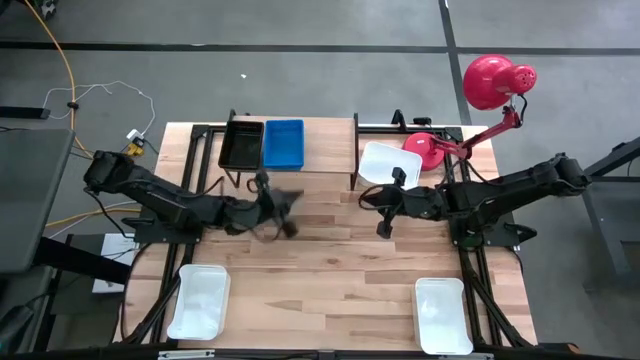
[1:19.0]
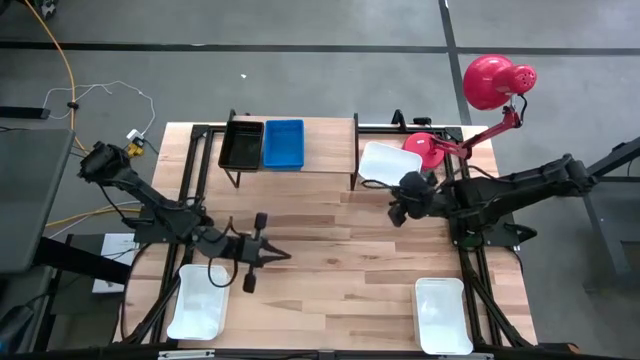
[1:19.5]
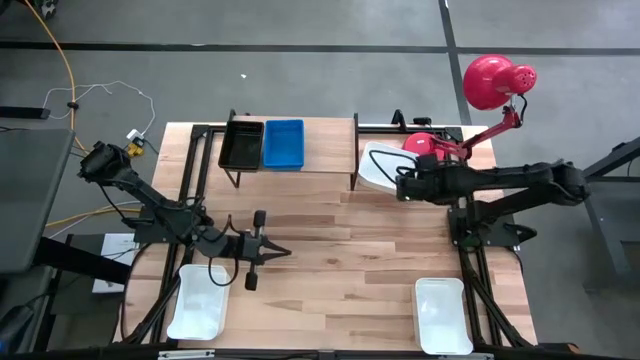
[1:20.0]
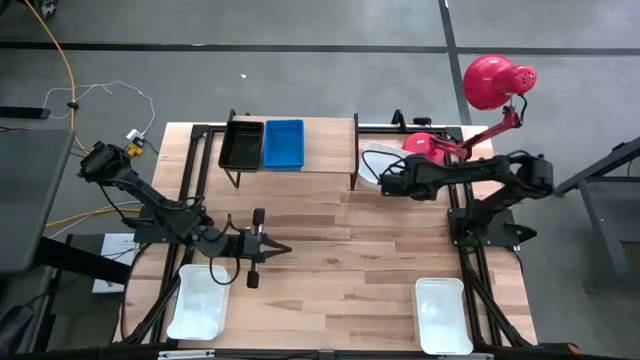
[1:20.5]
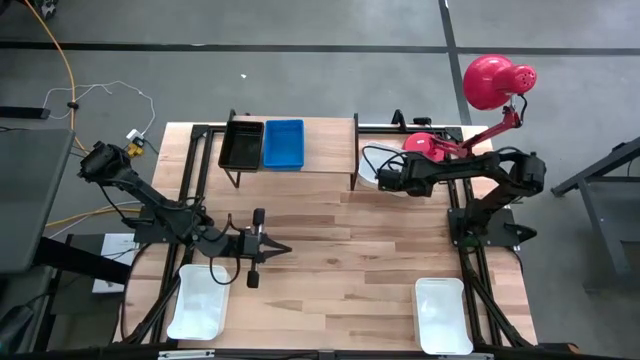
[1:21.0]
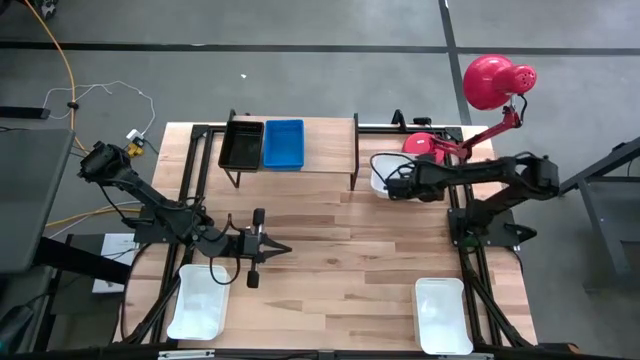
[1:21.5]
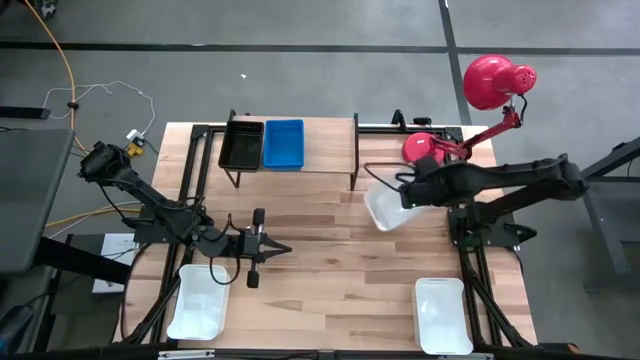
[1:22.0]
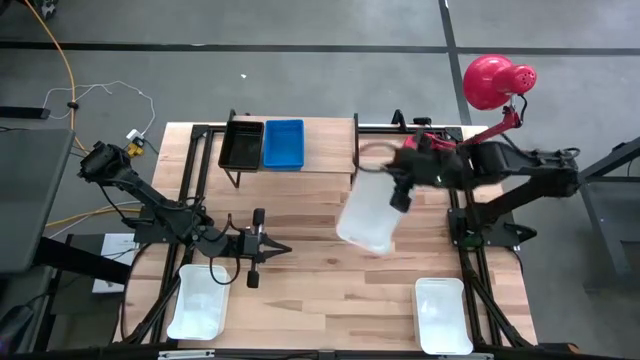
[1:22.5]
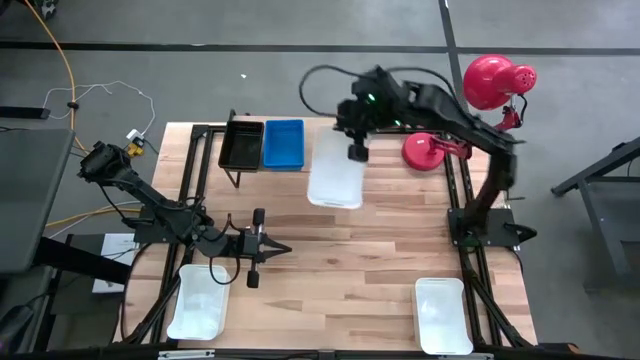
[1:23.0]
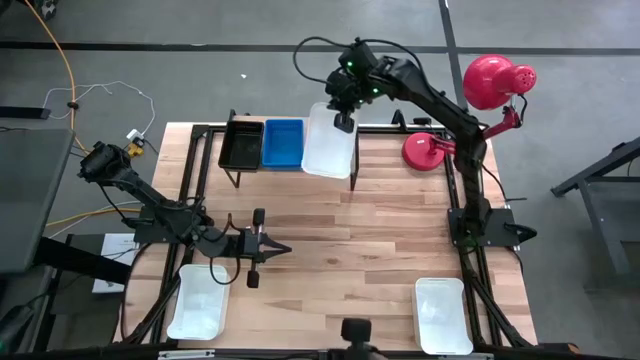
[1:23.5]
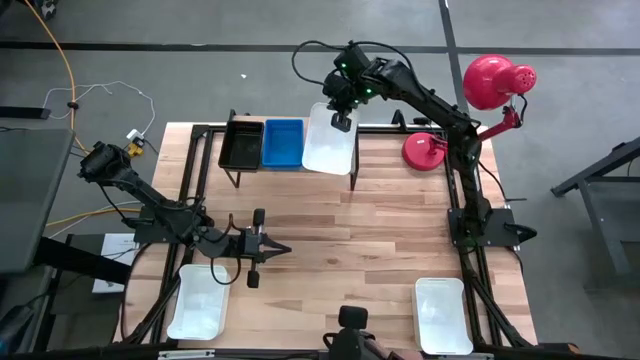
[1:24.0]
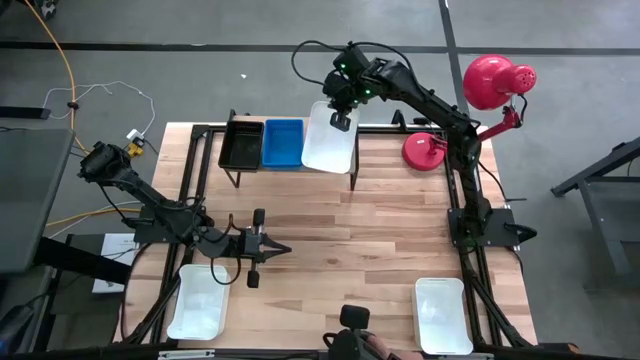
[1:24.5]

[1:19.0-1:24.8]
Task: Stack baskets on shelf by color
Put the top right white bin on the shelf

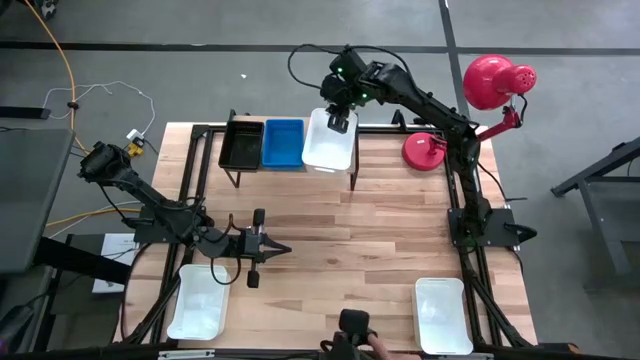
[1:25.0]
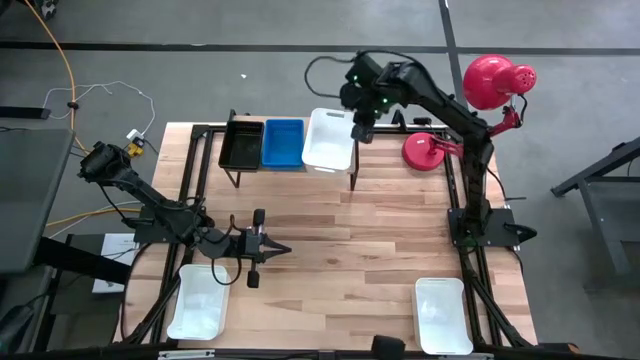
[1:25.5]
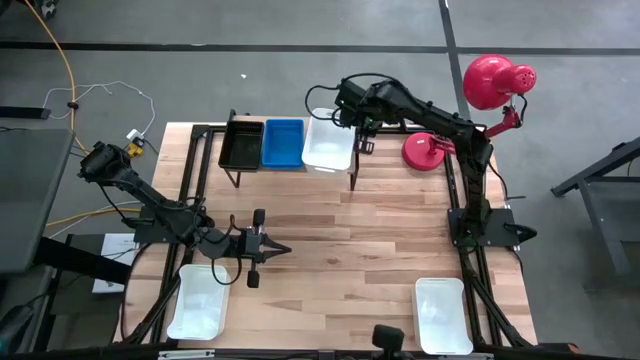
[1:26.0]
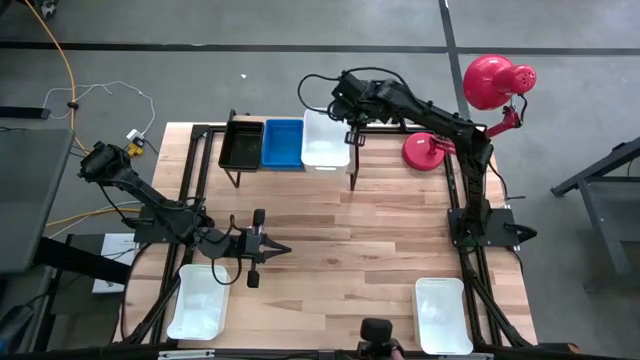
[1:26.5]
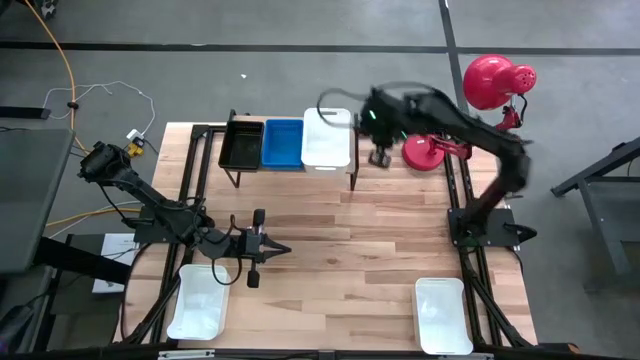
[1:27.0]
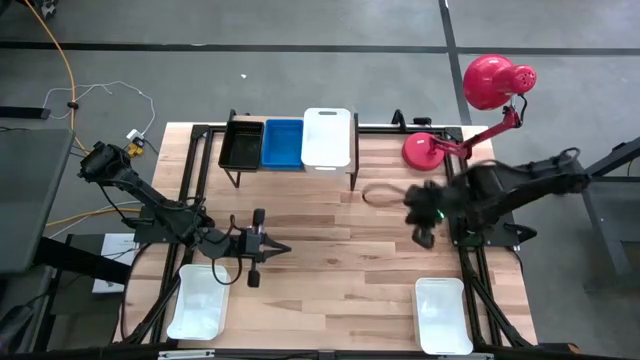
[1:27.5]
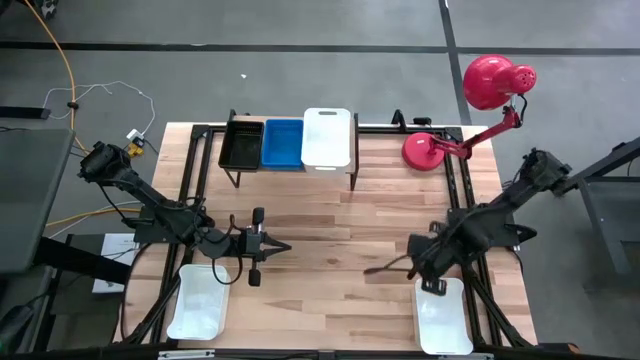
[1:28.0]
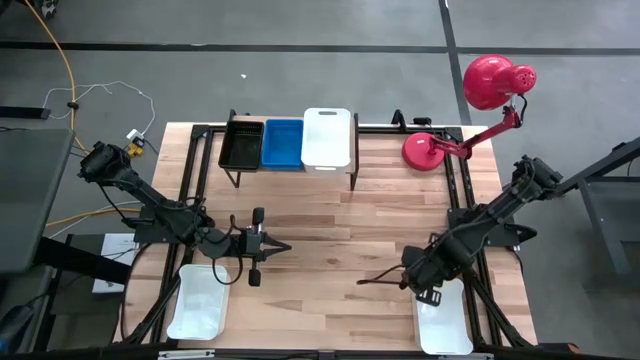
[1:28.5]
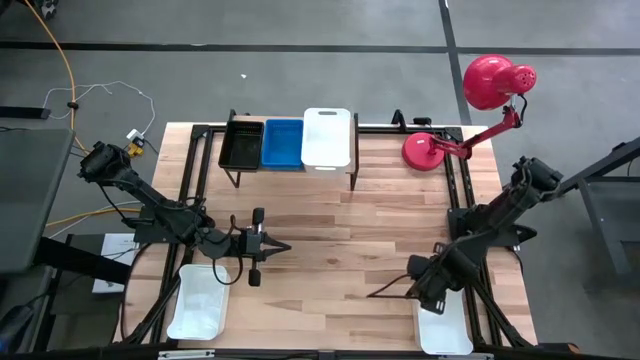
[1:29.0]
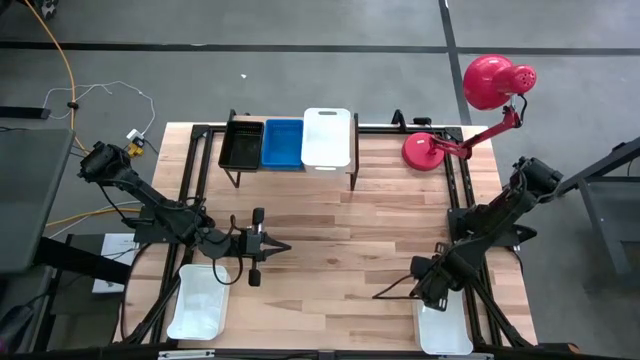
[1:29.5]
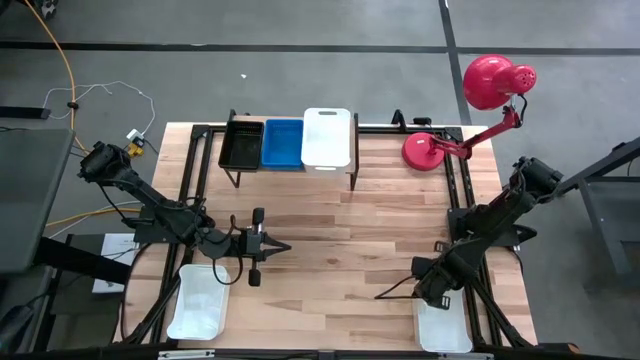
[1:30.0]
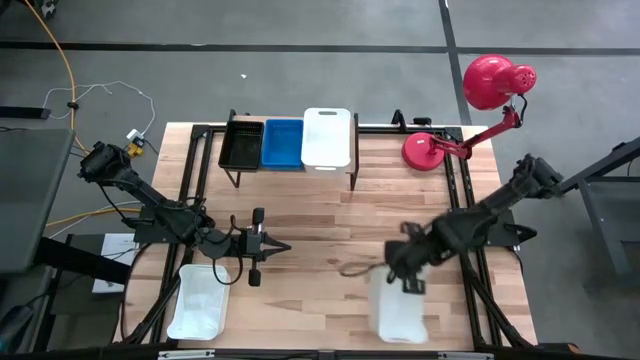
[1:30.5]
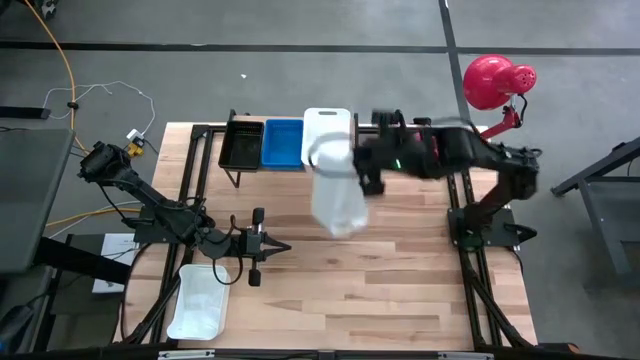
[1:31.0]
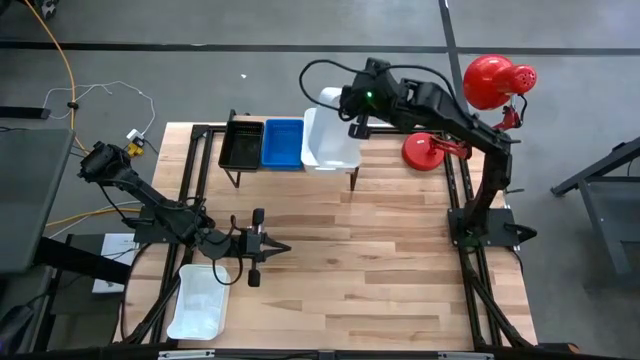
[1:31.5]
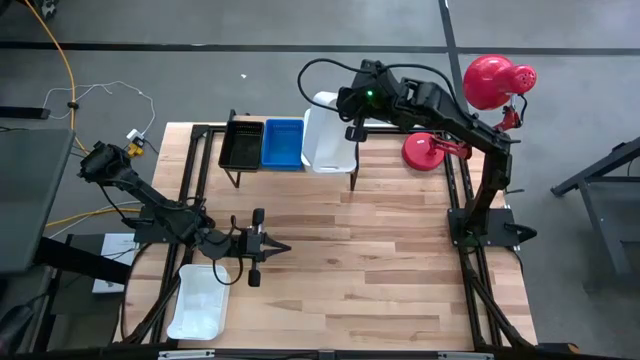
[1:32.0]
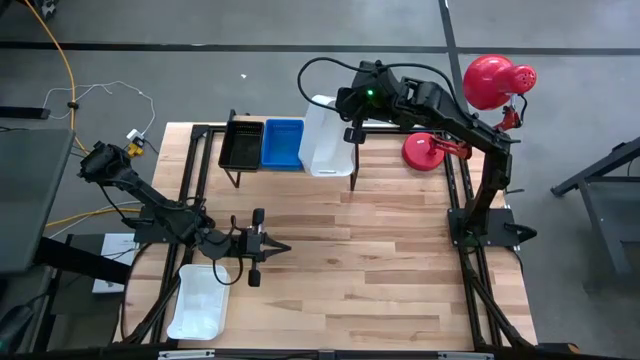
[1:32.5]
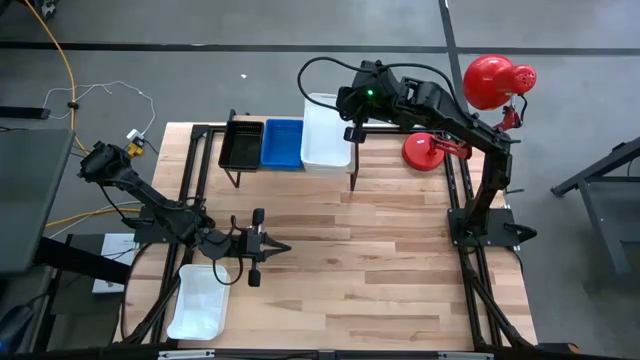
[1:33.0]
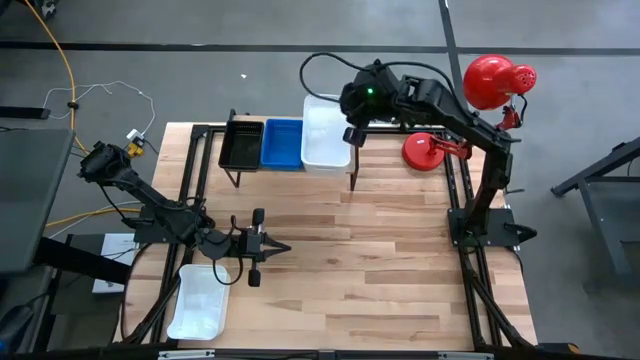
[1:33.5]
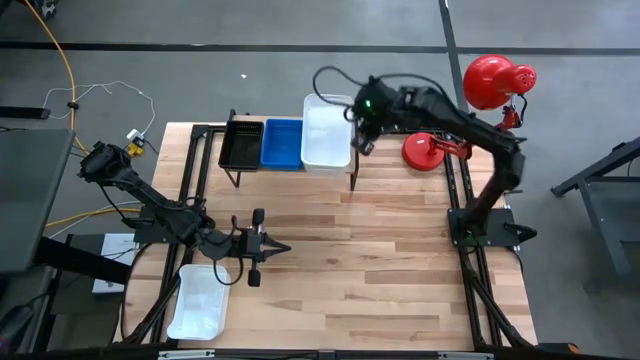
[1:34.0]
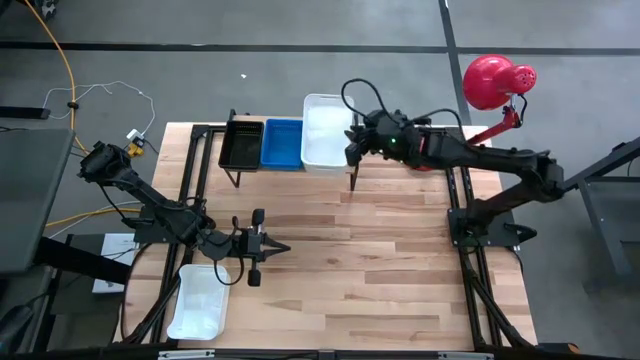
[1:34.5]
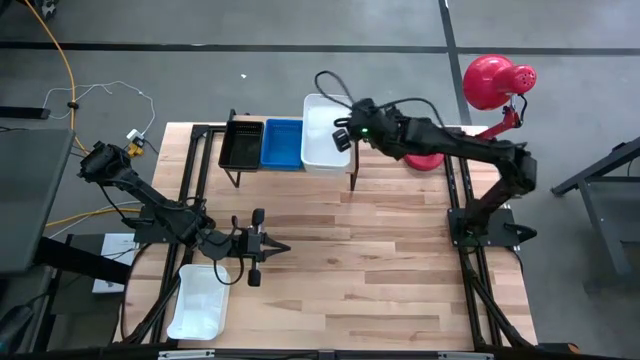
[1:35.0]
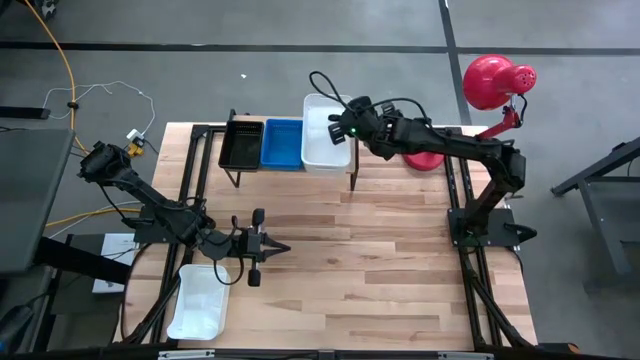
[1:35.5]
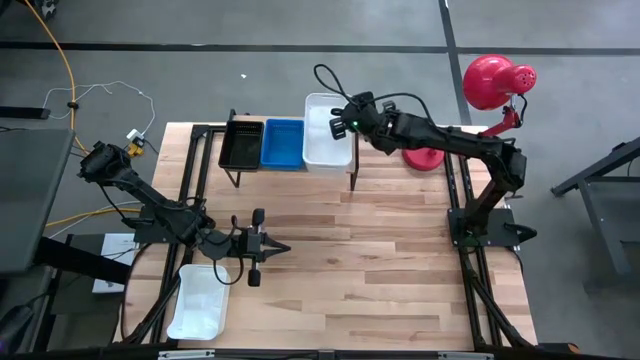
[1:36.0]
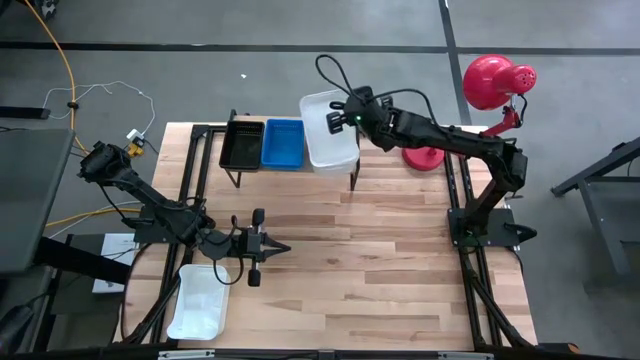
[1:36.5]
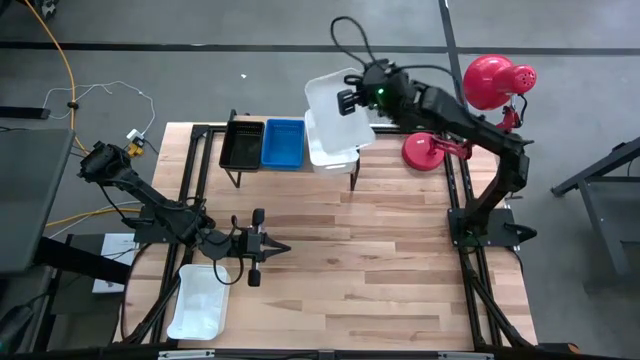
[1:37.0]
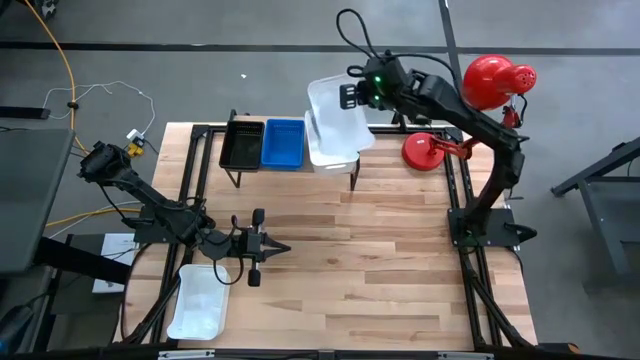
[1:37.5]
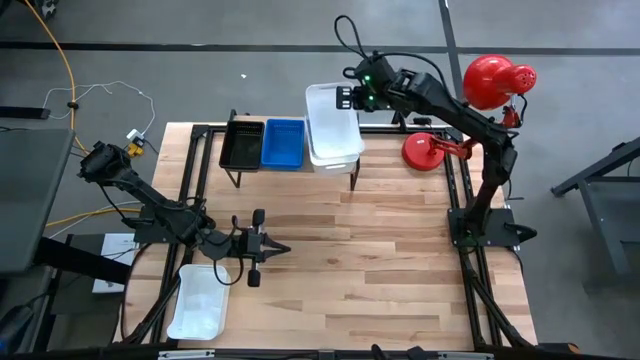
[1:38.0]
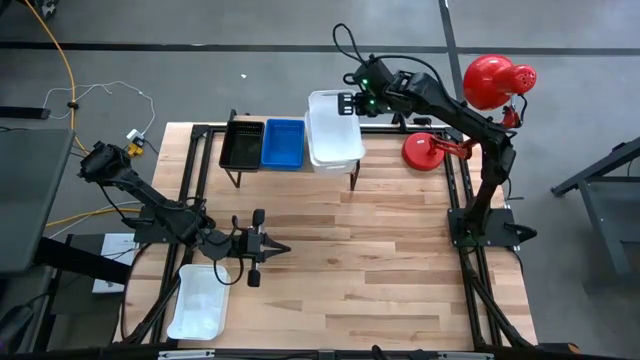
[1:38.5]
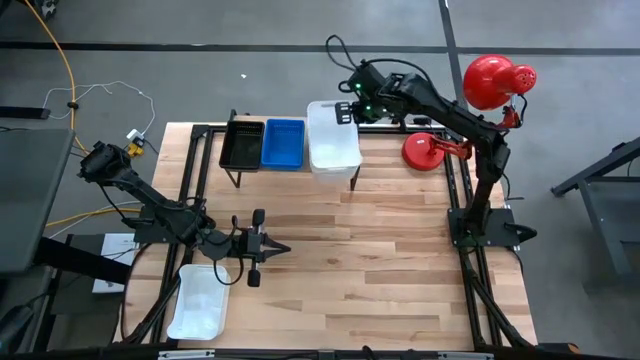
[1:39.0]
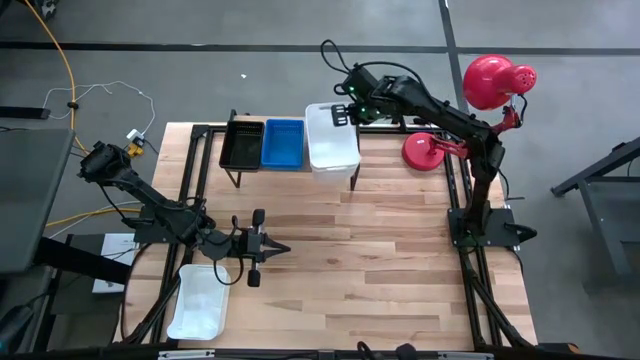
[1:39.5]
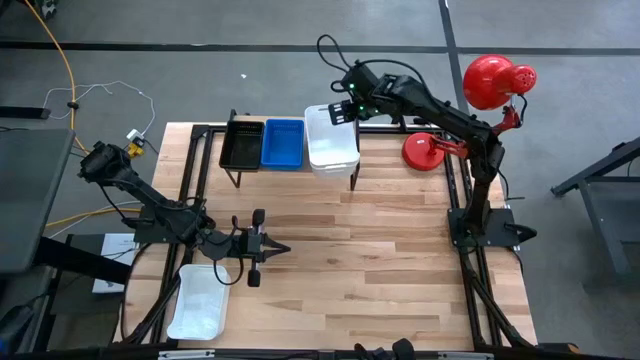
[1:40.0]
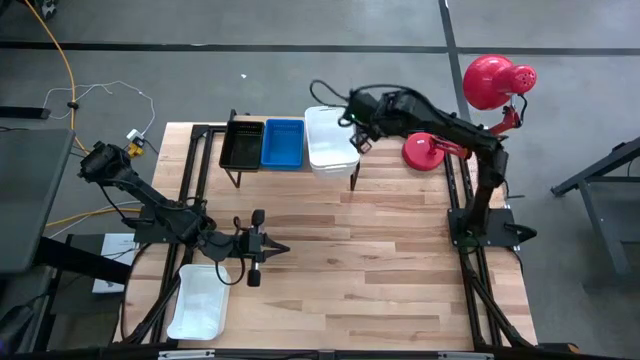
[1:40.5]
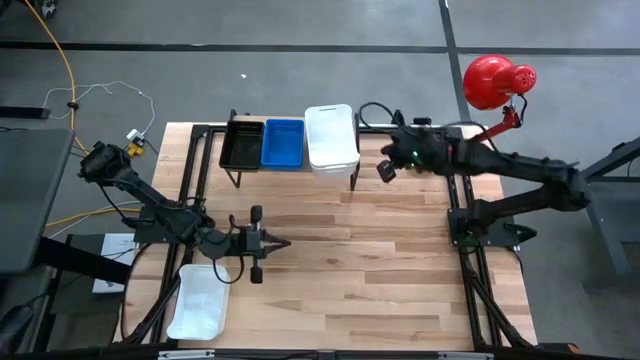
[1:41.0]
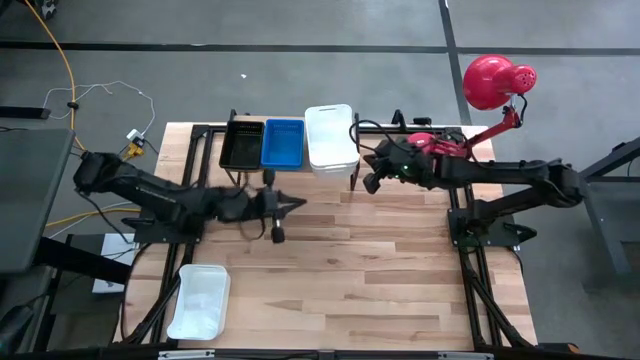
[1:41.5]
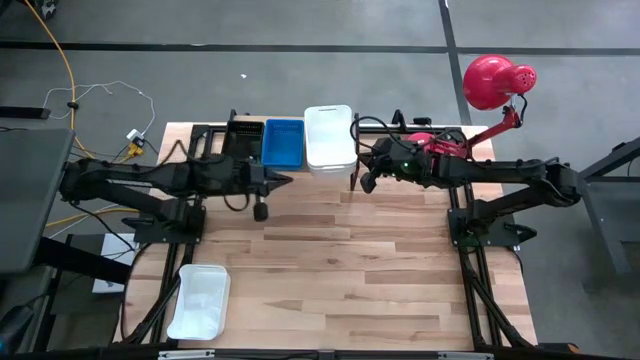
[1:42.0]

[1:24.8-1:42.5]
Stack the right white bin on the white bin on the shelf
